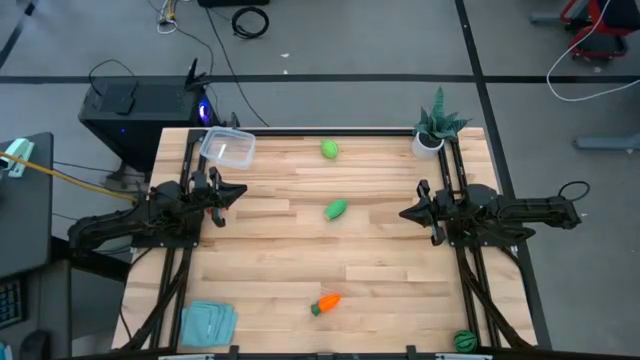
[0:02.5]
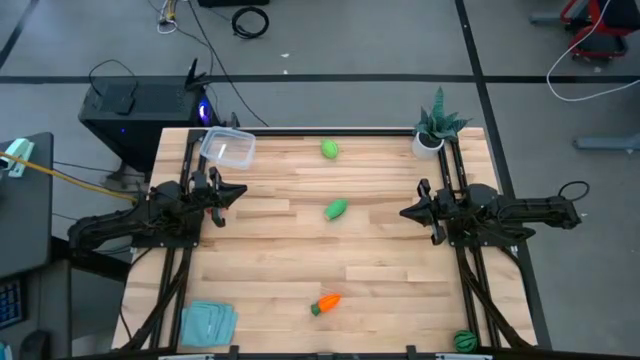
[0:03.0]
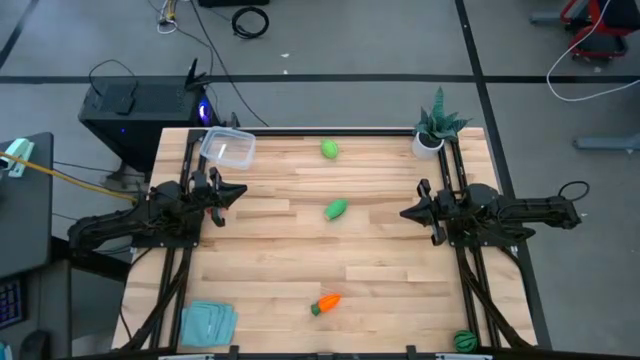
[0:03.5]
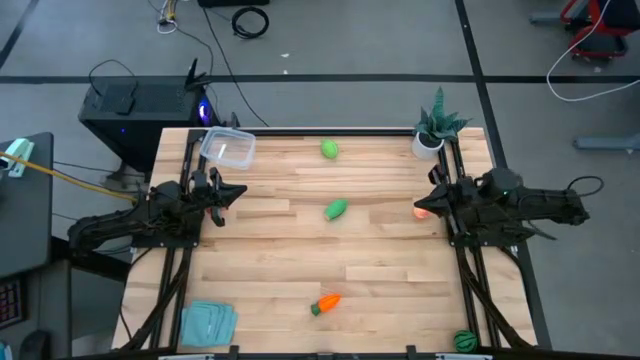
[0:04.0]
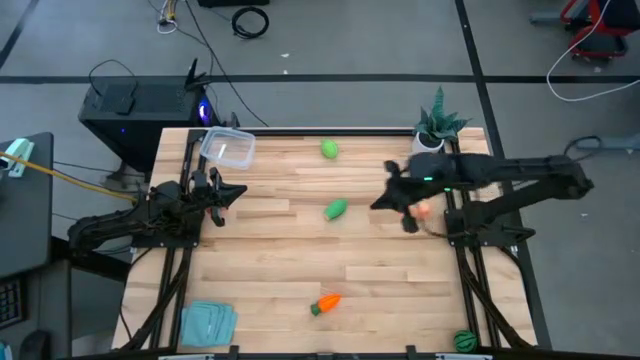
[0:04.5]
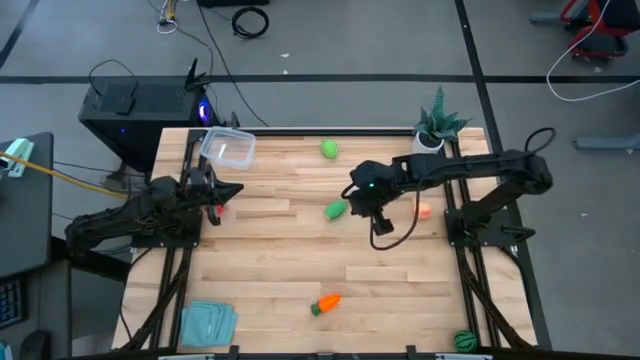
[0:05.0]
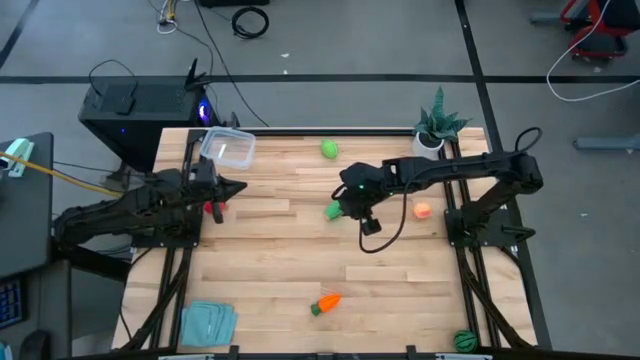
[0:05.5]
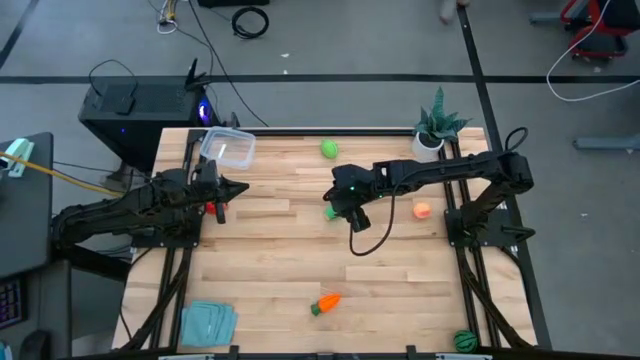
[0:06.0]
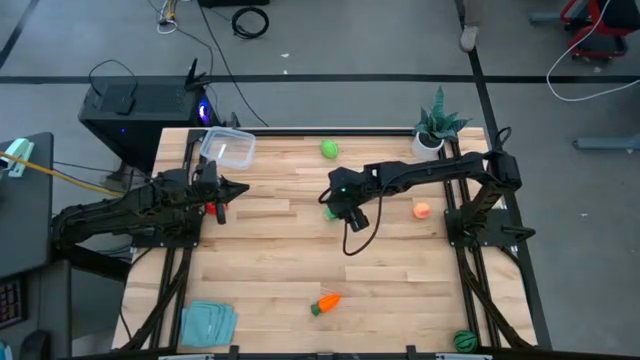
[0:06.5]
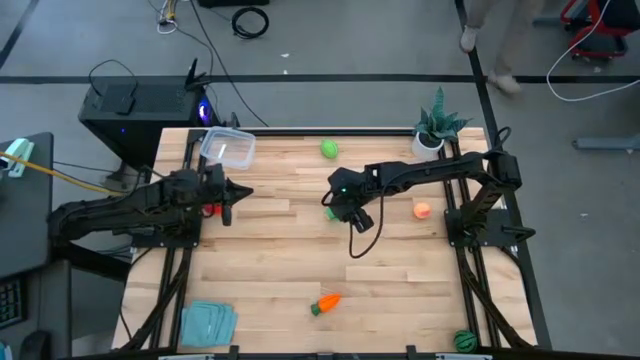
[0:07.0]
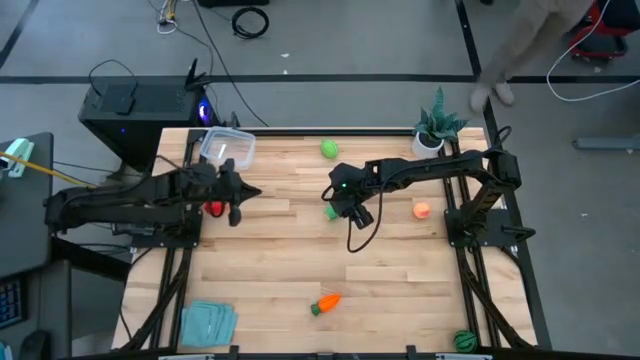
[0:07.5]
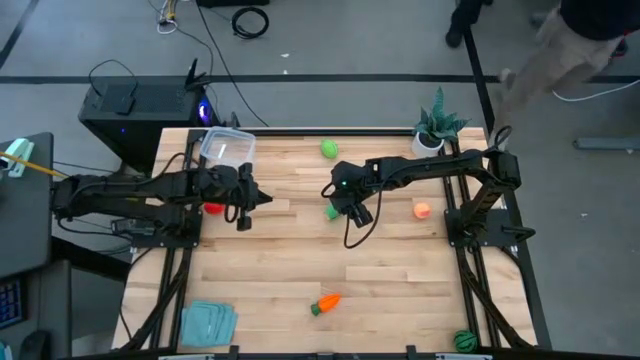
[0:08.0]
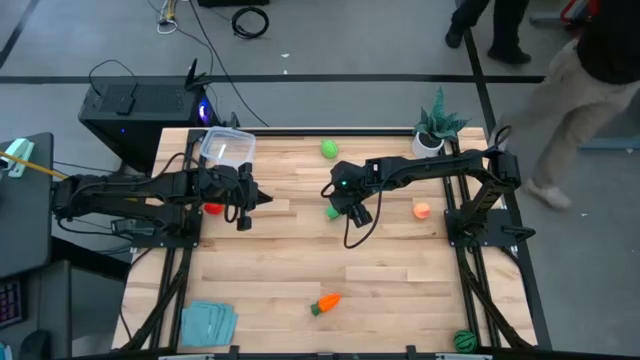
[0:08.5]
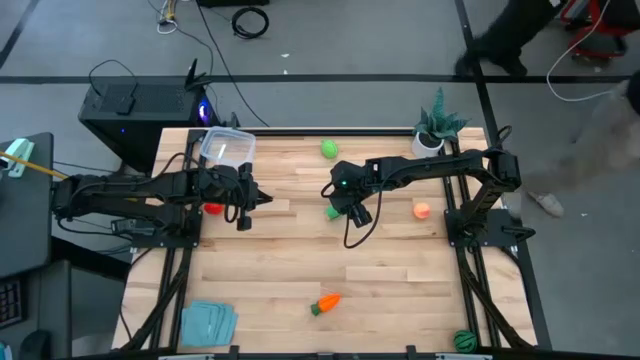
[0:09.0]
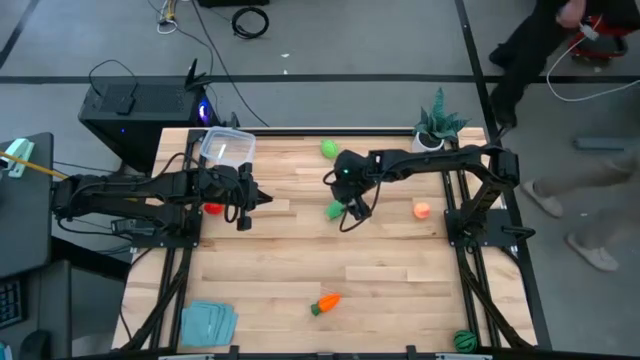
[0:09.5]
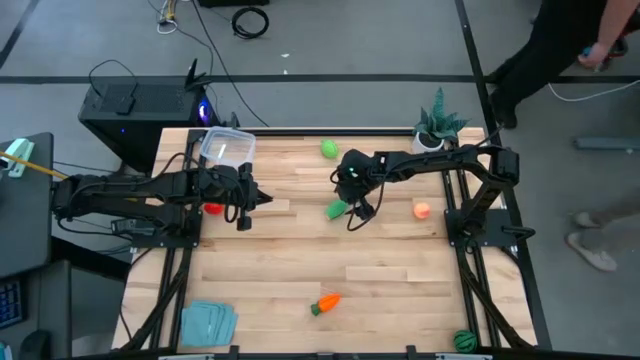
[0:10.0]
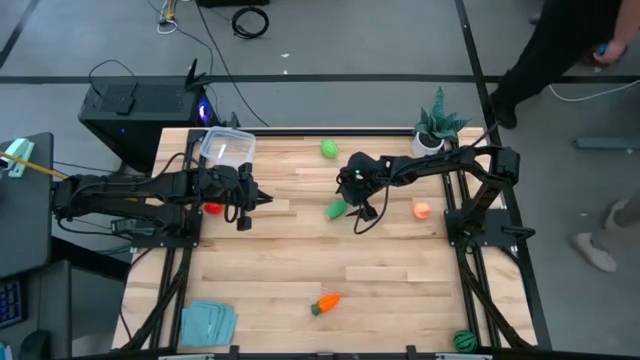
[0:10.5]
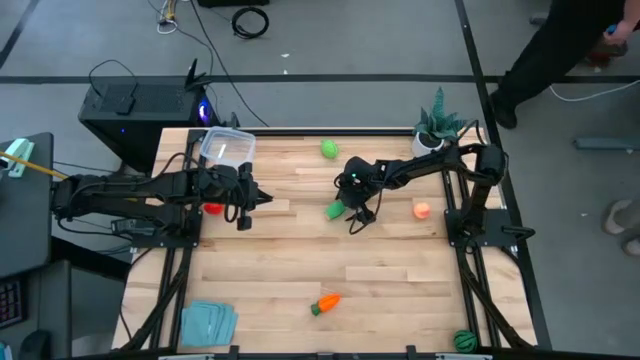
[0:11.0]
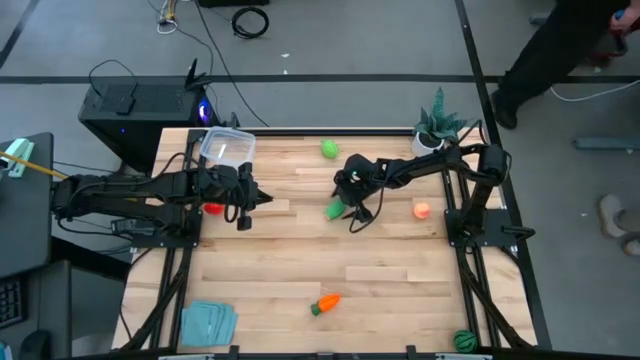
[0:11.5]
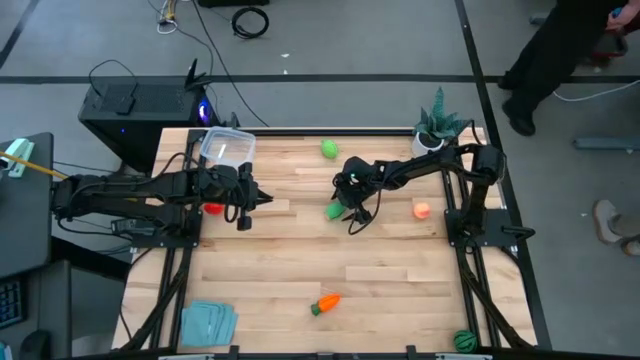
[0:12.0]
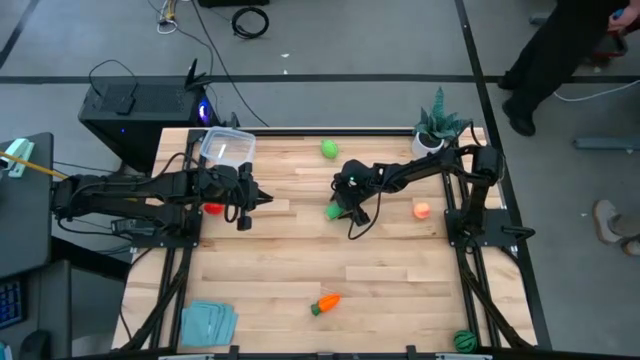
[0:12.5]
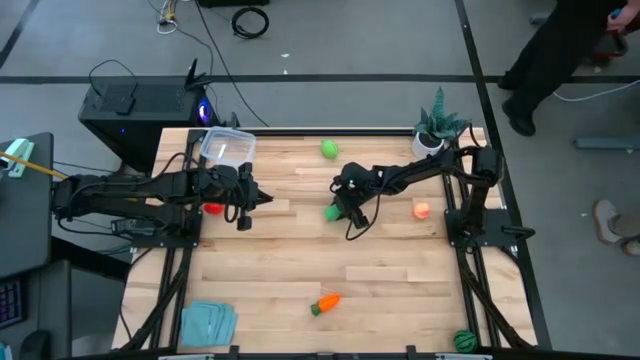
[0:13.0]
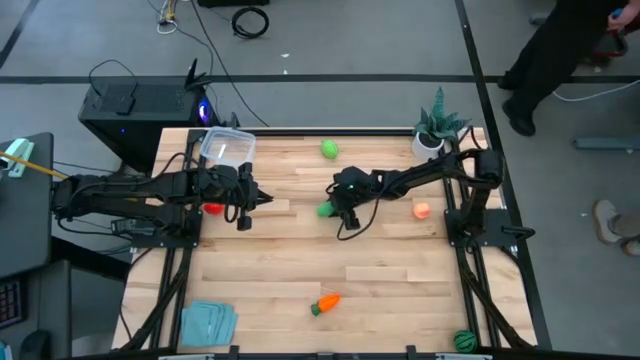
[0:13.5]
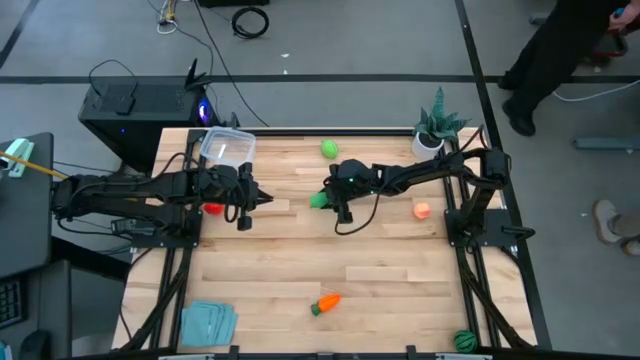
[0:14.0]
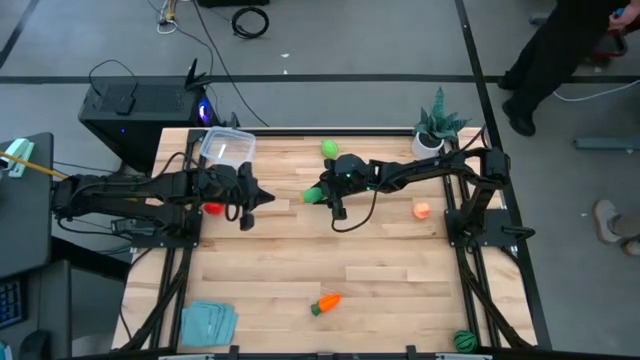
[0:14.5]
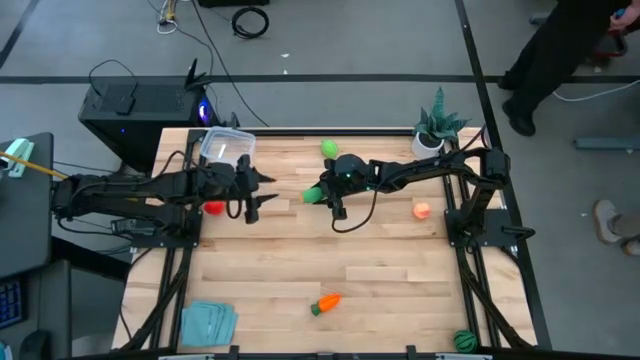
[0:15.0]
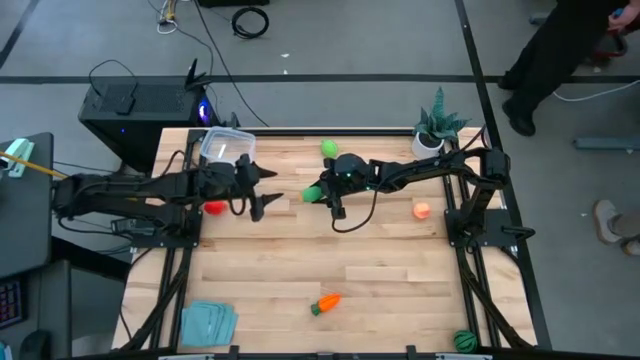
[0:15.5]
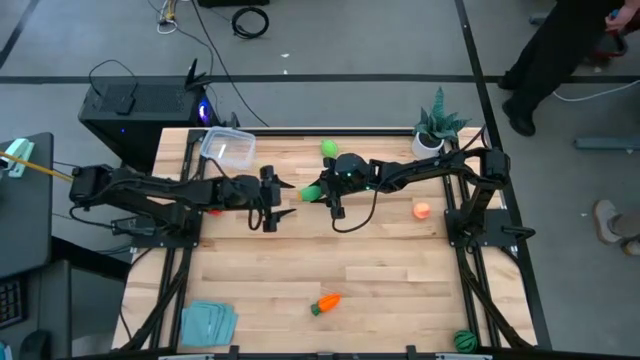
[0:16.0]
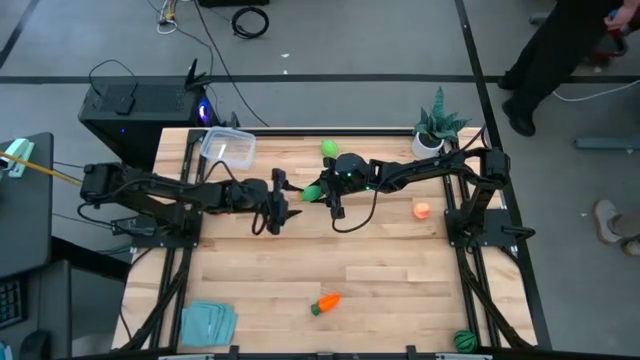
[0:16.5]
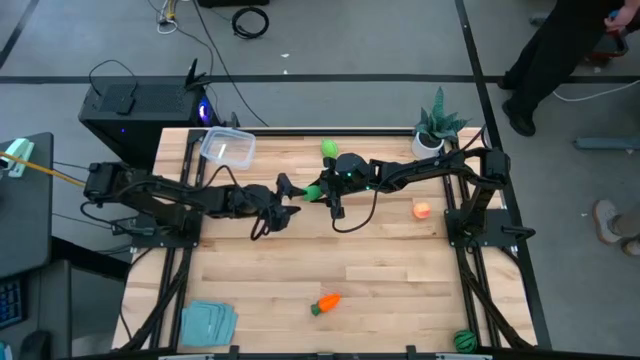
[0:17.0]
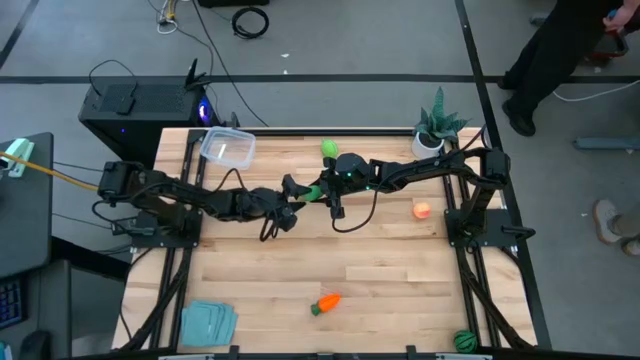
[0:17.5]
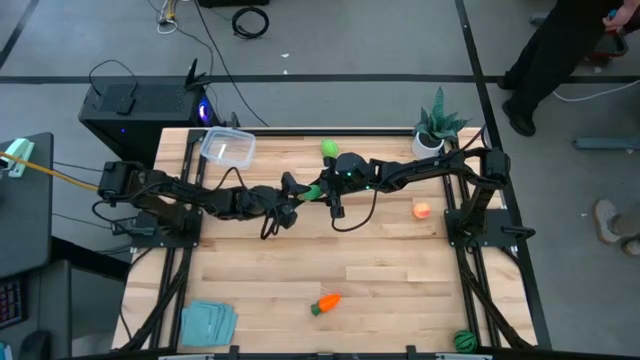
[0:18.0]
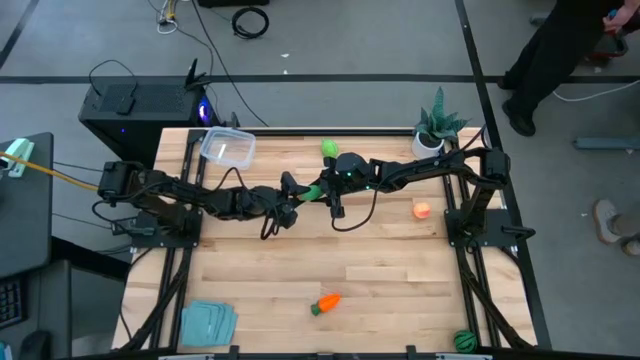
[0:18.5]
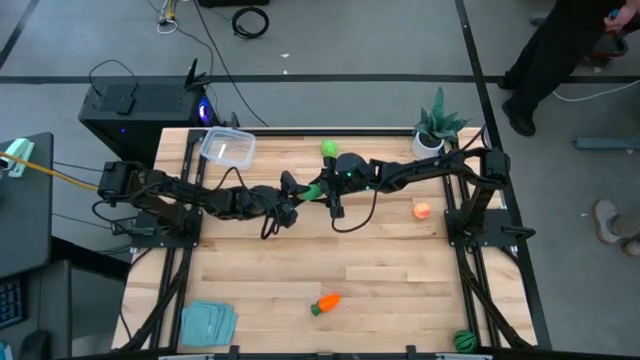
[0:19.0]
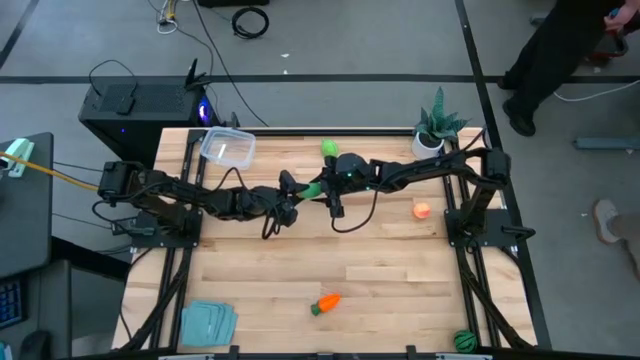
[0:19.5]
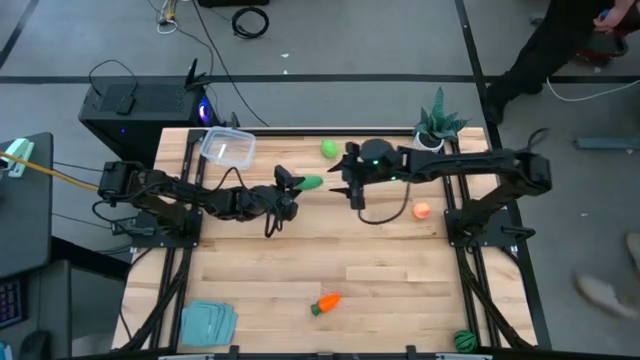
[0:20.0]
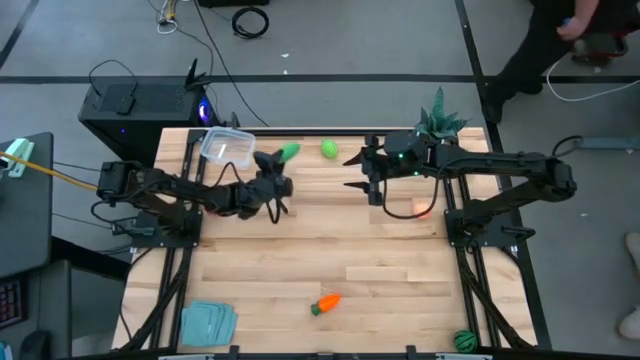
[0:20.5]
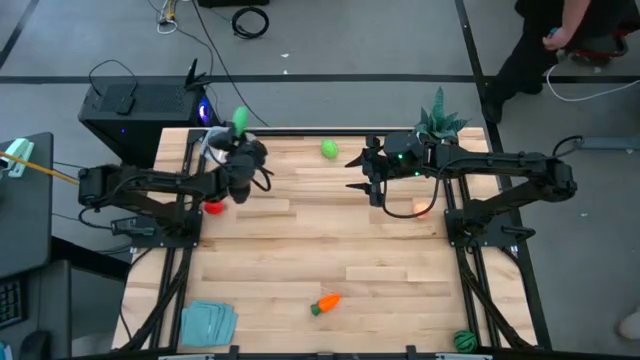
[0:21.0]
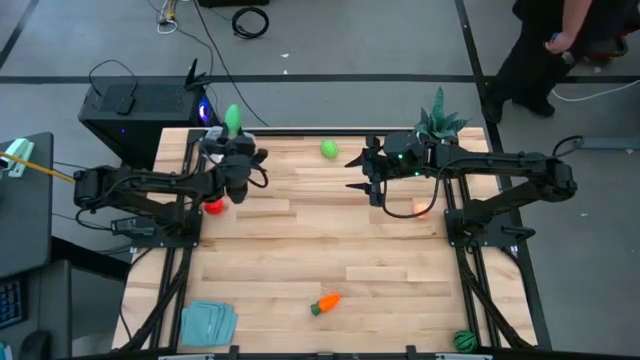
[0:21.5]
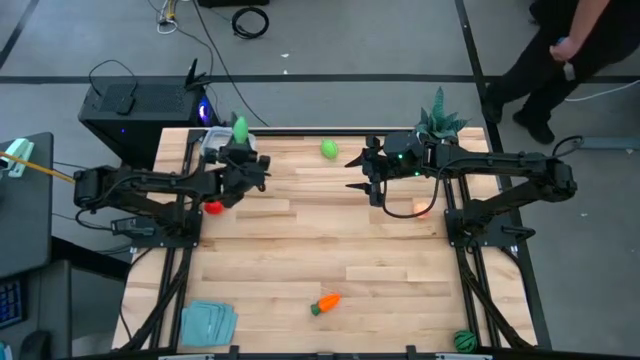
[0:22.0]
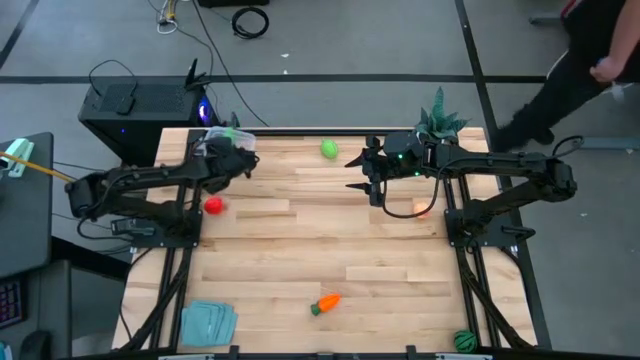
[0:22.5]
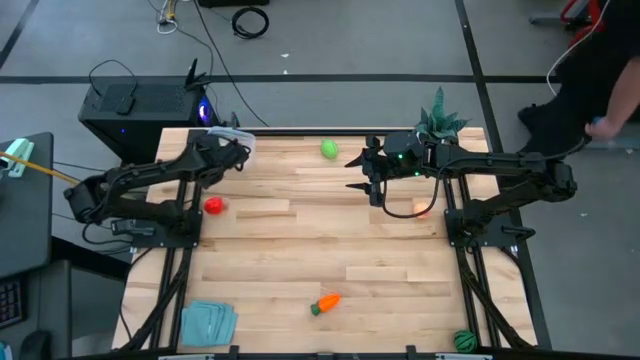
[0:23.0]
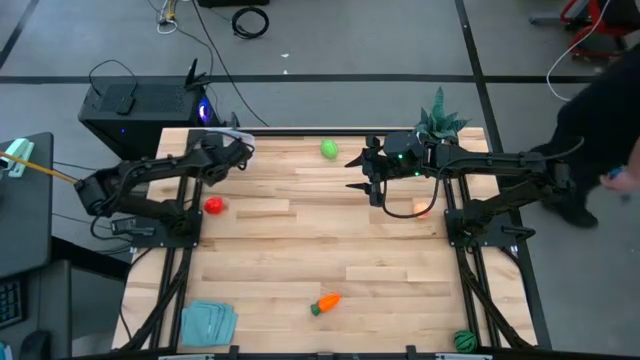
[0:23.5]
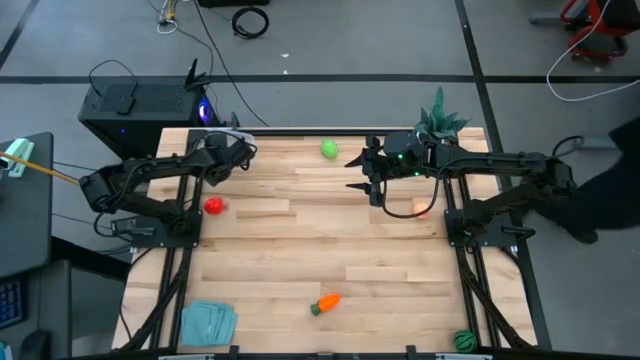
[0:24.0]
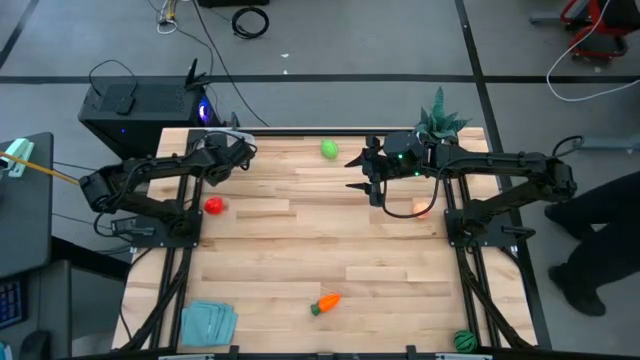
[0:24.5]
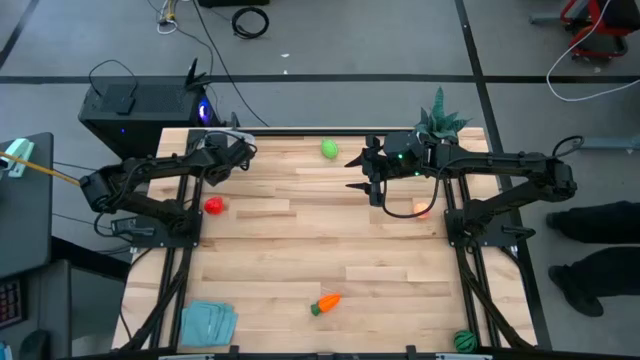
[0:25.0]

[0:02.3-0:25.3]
Task: Pick and placing Produce into tupperware
Put the green corn into the transparent bin
